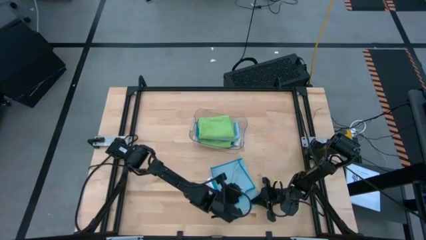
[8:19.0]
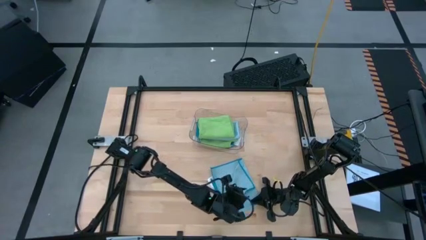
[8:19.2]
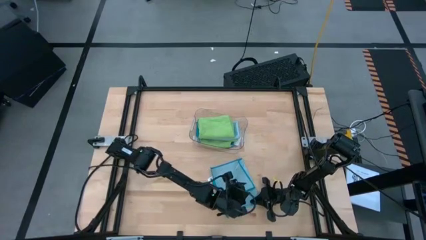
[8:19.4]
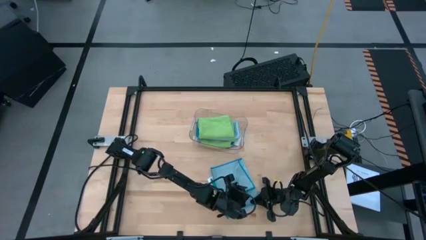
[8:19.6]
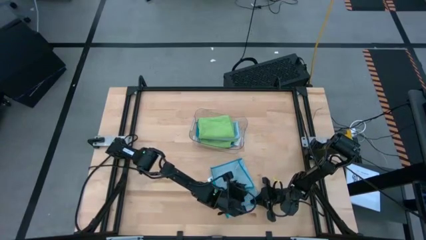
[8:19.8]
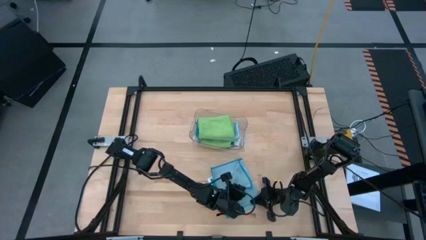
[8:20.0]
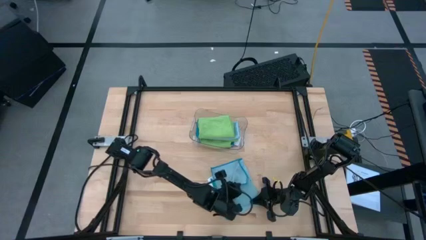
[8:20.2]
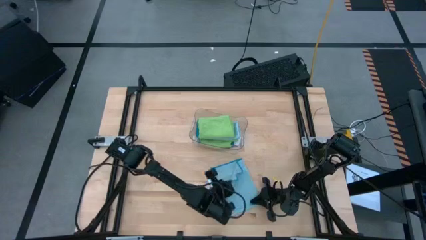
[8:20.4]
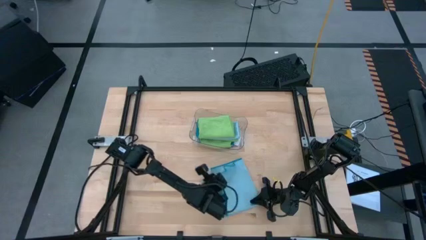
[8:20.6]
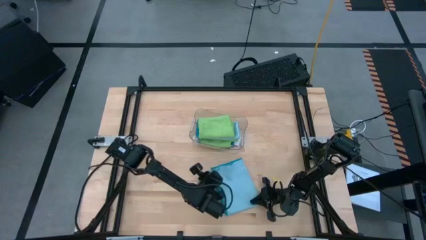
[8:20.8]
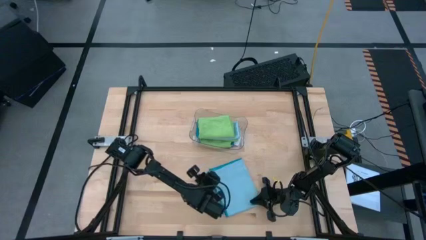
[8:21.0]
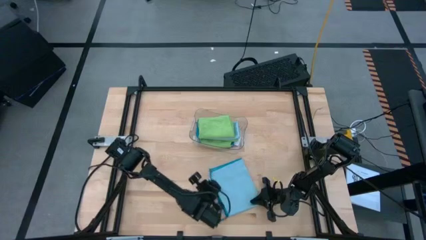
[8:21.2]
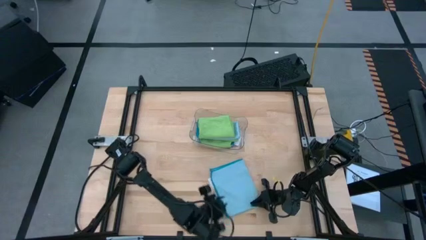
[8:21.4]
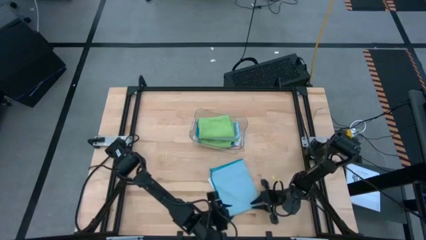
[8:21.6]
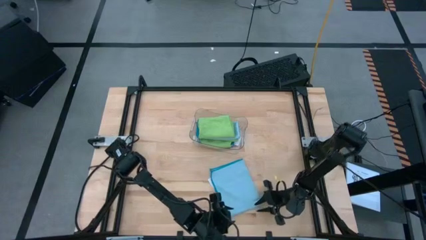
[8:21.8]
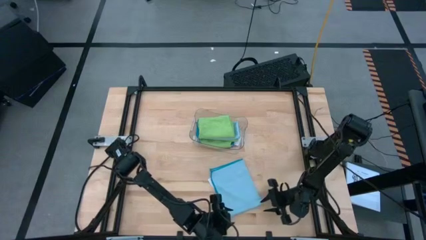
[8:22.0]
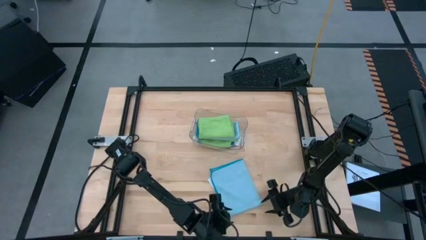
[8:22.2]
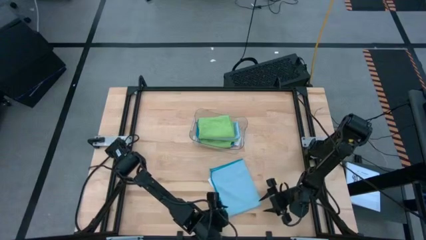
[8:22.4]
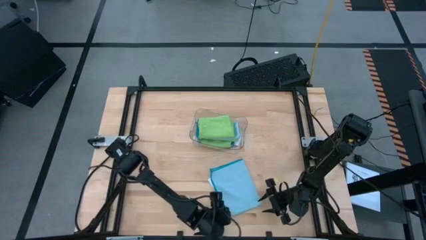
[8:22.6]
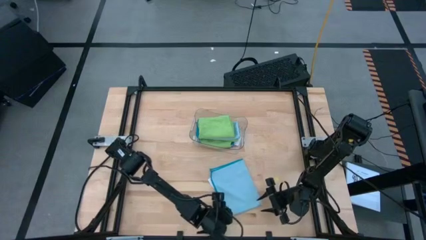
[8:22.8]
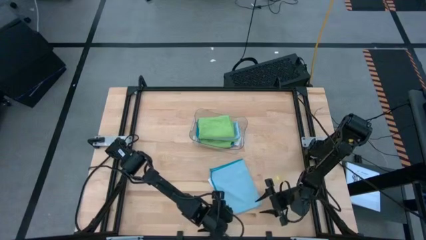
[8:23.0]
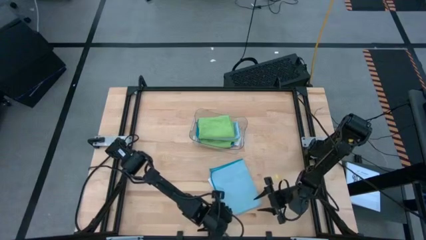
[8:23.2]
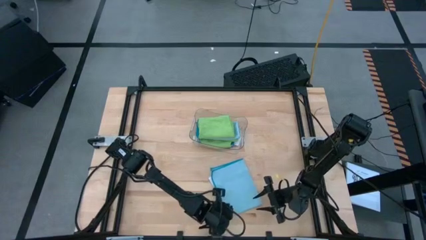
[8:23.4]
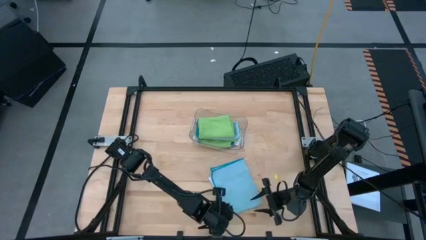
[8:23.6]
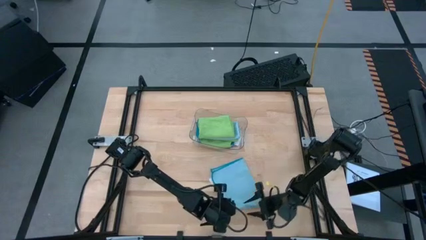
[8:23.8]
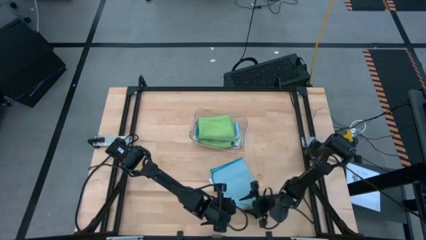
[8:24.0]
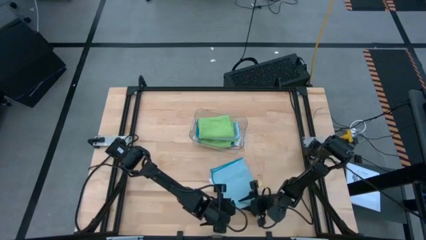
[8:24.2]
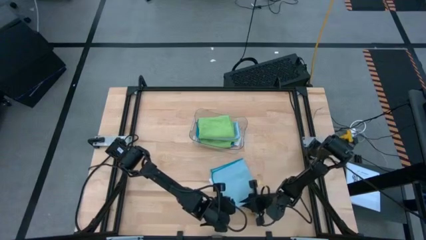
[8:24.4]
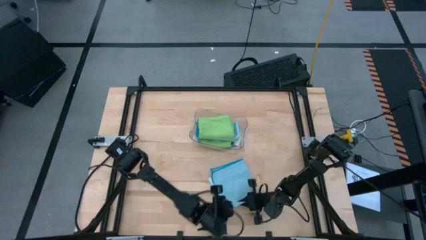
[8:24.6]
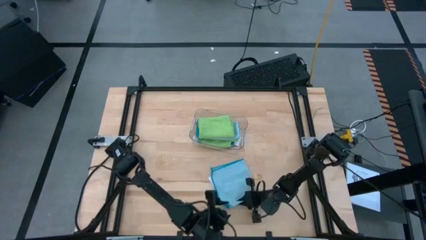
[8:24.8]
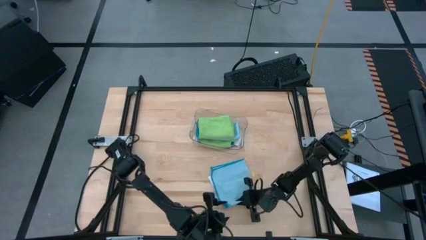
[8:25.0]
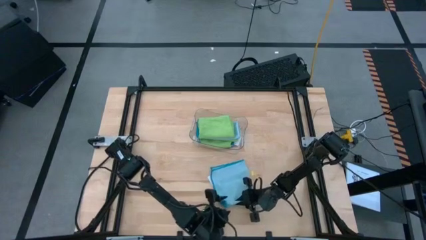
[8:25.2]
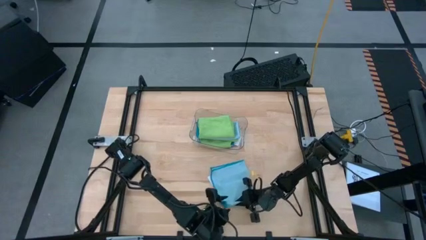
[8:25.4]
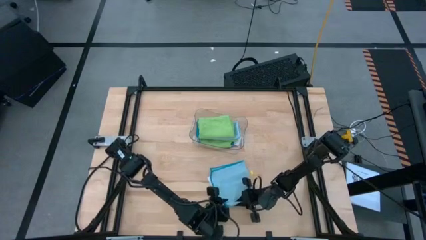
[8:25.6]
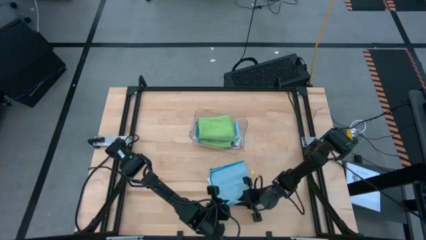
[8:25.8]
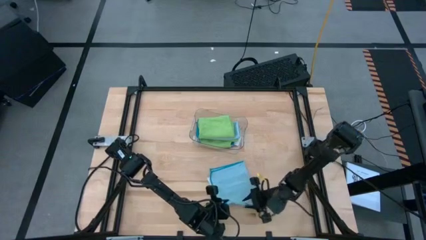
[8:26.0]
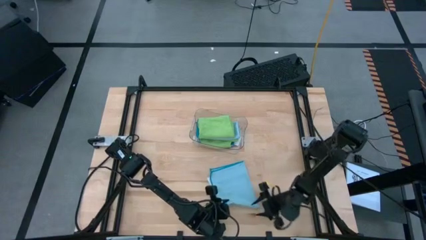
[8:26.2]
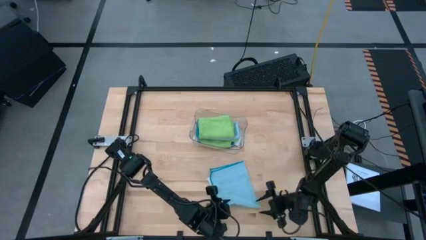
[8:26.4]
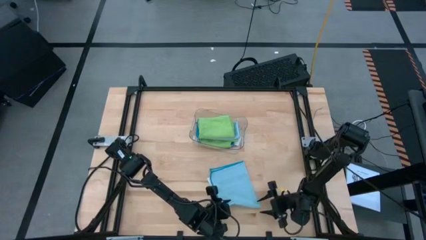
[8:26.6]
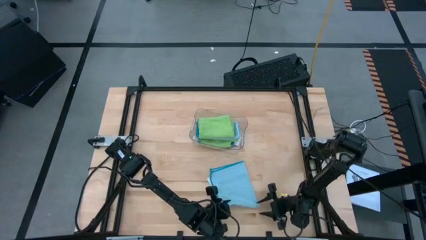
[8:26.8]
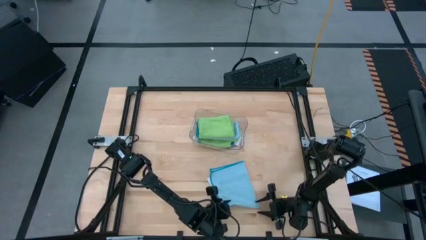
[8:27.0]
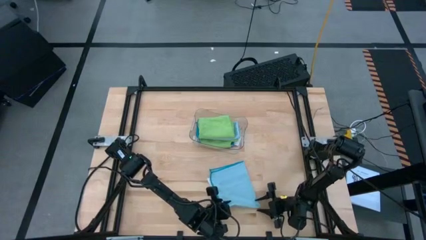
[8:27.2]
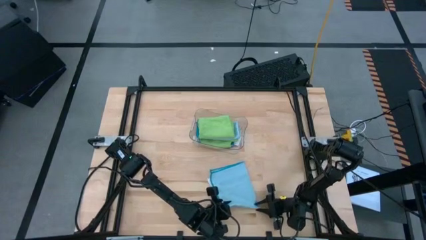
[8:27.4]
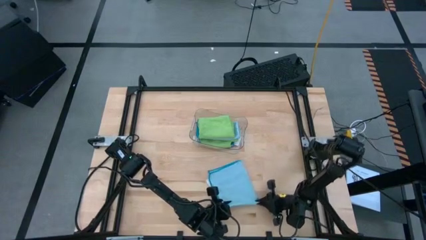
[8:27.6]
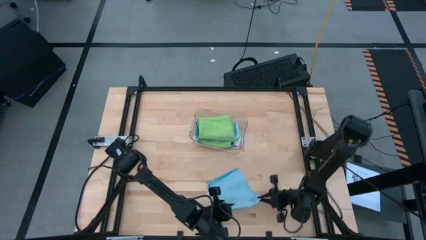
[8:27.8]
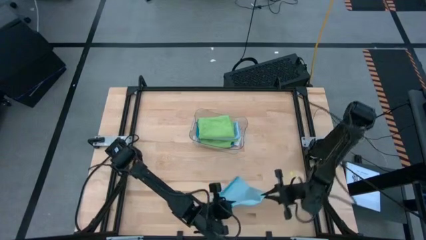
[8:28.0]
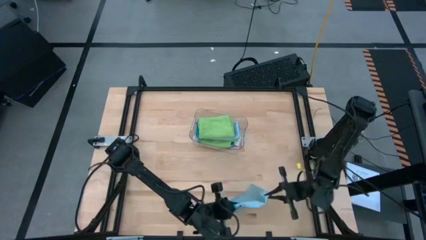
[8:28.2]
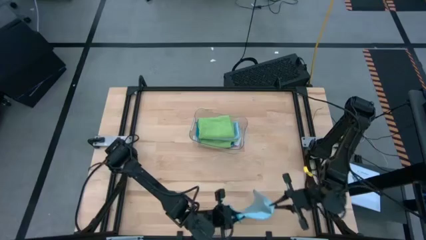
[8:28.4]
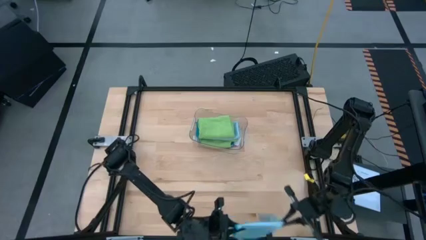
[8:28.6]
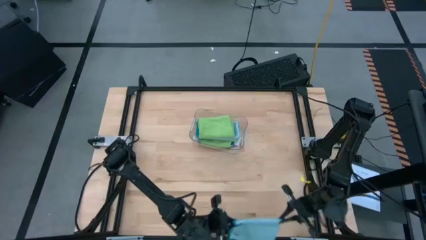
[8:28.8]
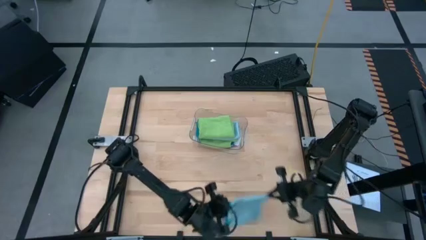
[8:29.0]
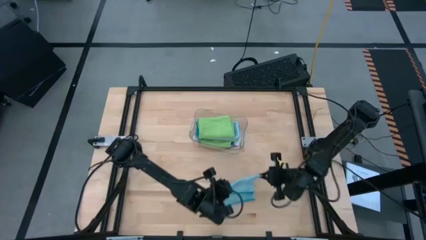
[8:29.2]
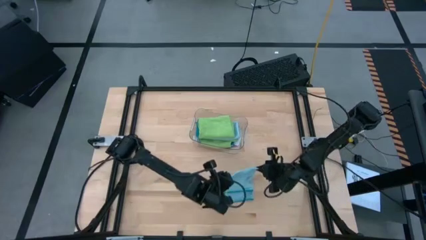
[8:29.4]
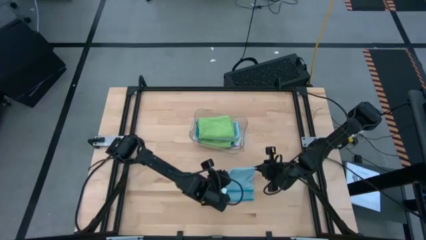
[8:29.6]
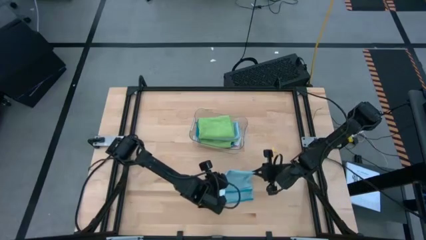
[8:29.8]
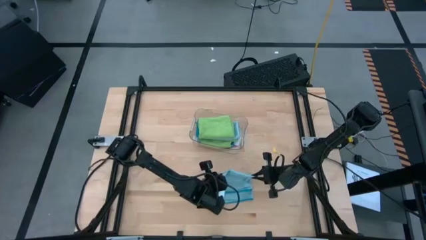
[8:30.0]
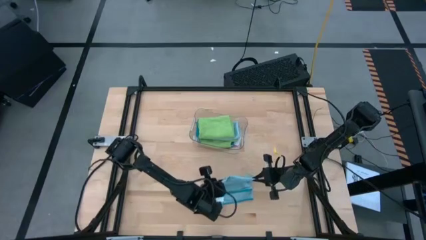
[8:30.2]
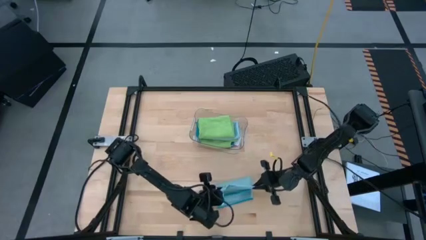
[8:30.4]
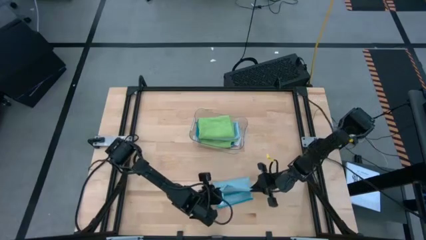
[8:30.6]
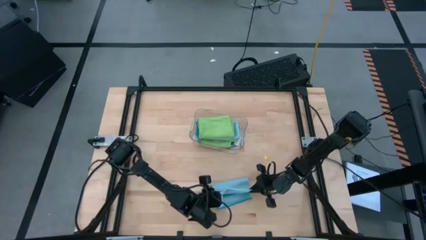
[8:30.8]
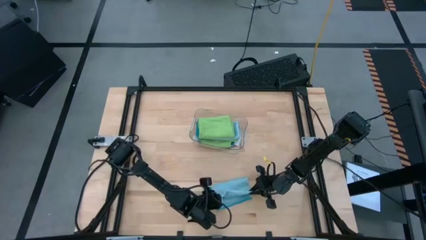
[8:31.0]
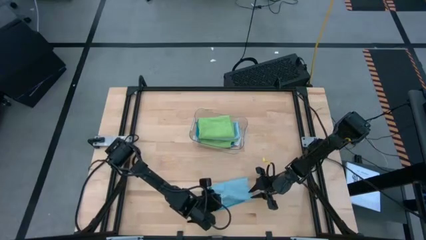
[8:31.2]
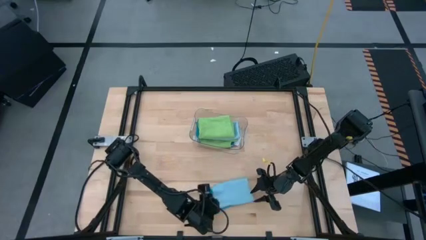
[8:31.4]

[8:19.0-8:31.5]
Task: Fold microfiber towels
Fold the blue microfiber cloth

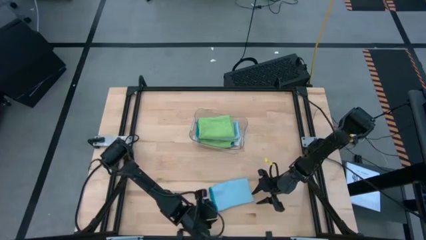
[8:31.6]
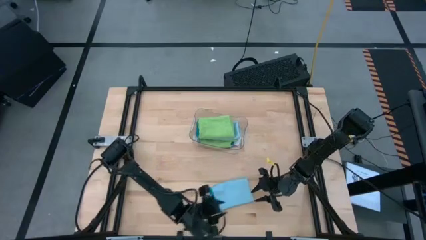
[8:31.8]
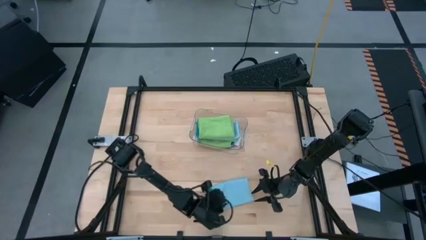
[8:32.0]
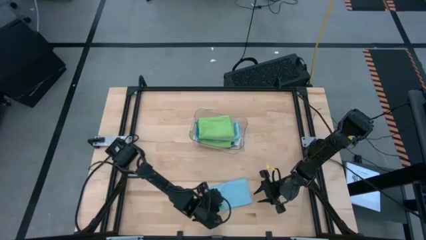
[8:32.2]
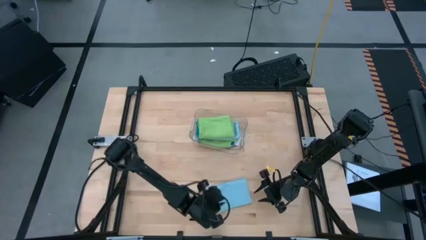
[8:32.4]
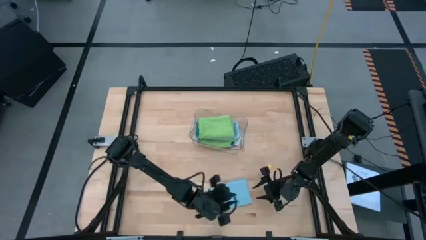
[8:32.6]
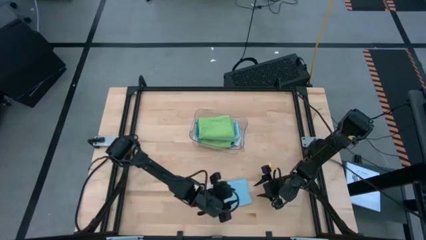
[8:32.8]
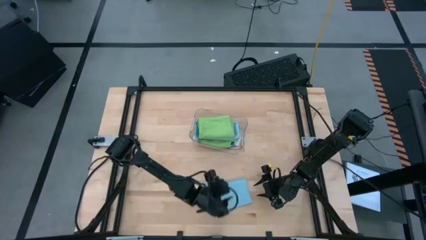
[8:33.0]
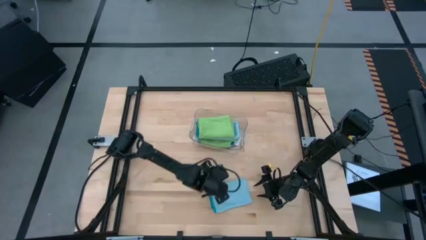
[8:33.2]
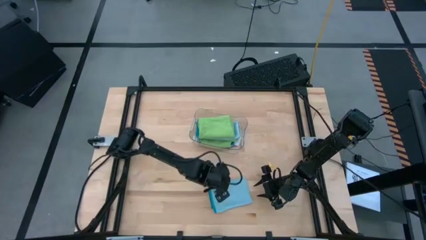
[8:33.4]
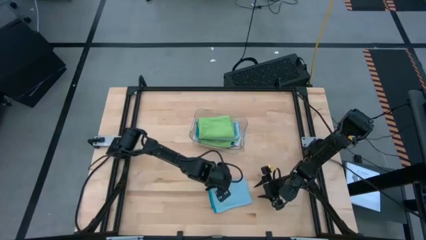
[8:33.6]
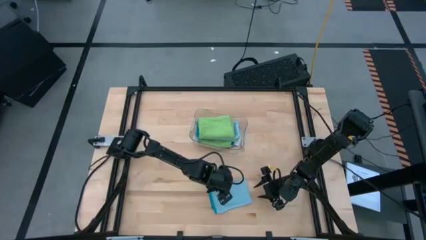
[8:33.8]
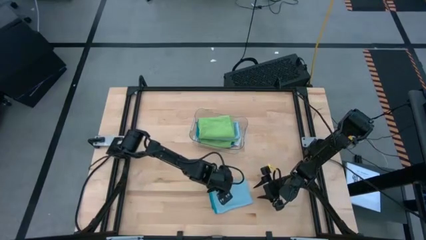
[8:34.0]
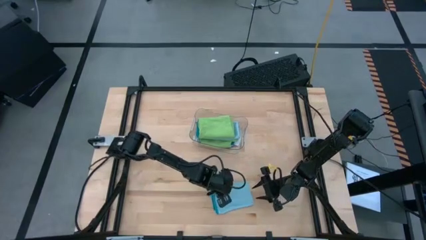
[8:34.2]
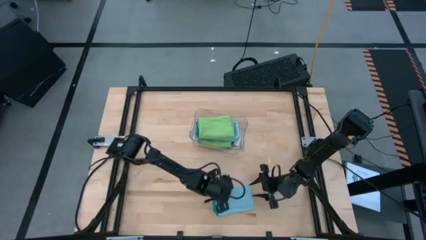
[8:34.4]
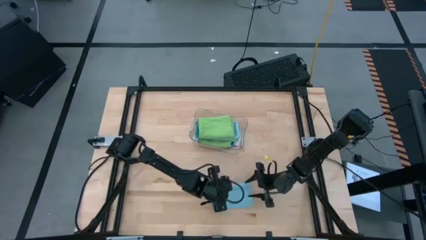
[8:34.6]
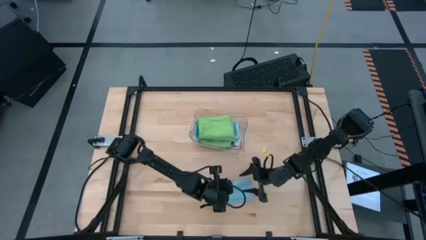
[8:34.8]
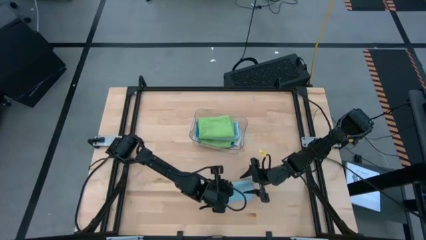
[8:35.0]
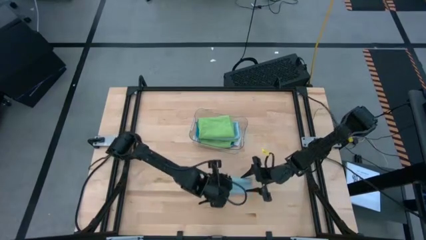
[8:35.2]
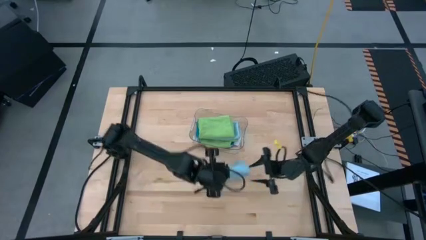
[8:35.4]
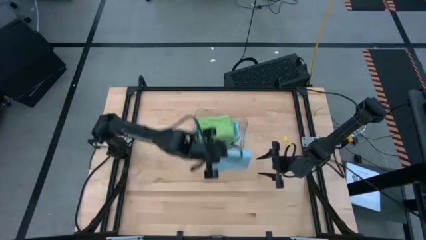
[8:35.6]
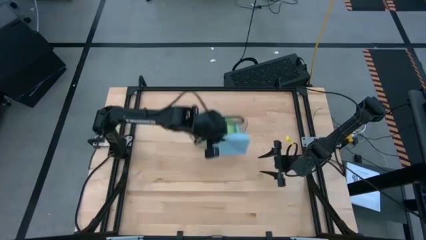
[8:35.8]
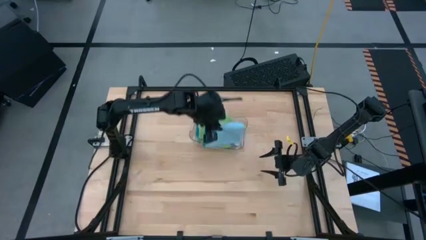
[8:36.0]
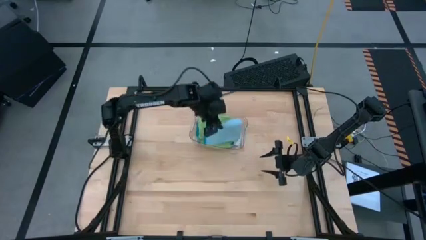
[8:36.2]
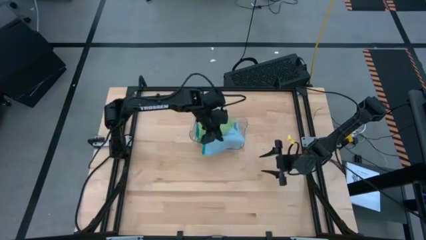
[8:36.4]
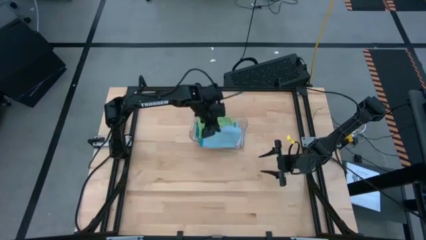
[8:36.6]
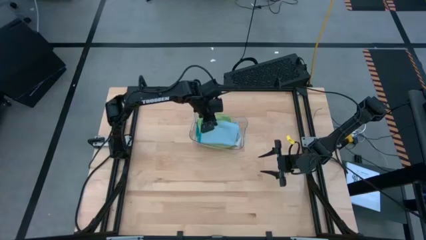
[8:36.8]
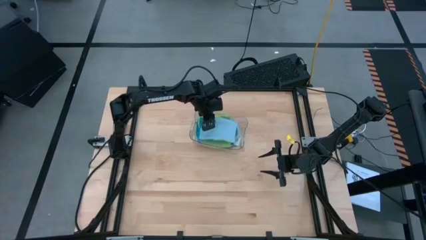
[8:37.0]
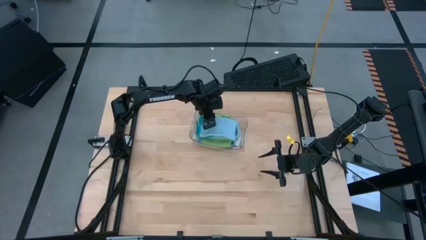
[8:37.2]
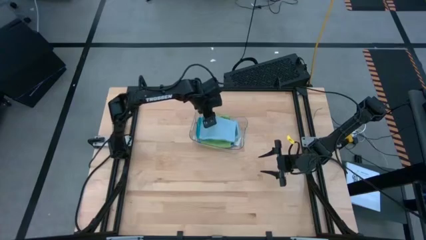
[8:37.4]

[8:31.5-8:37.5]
Stack the folded blue microfiber cloth on top of the green microfiber cloth in the transparent bin
